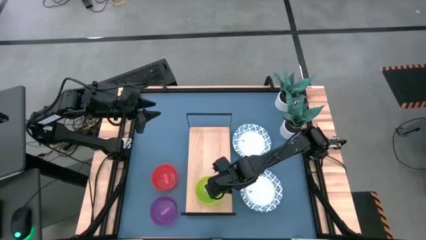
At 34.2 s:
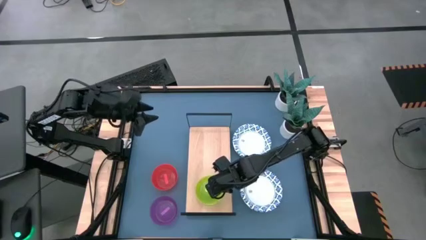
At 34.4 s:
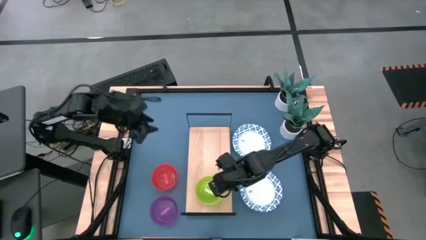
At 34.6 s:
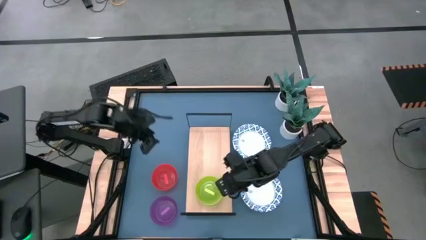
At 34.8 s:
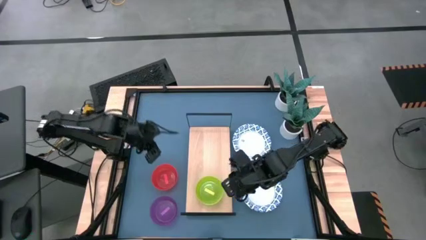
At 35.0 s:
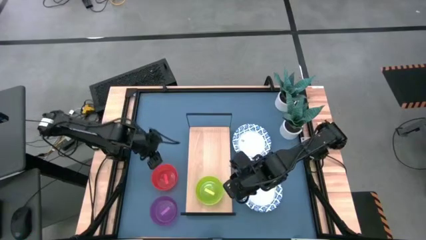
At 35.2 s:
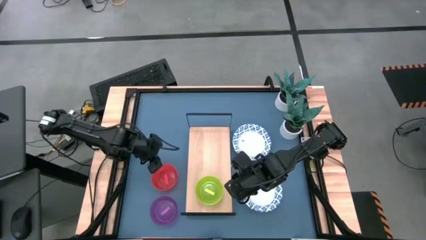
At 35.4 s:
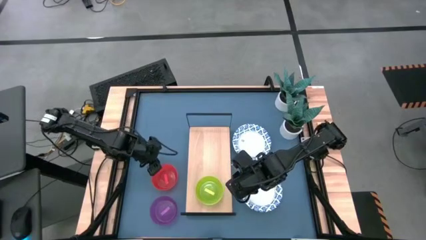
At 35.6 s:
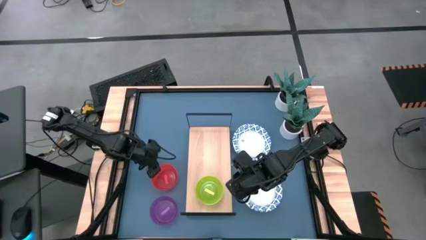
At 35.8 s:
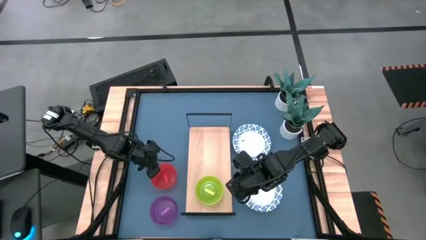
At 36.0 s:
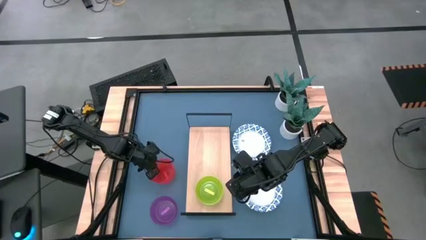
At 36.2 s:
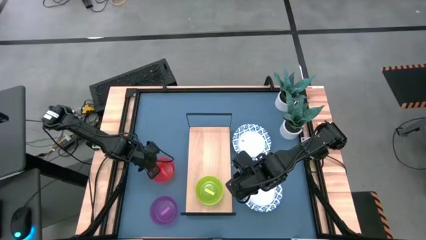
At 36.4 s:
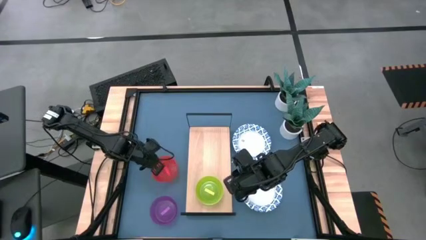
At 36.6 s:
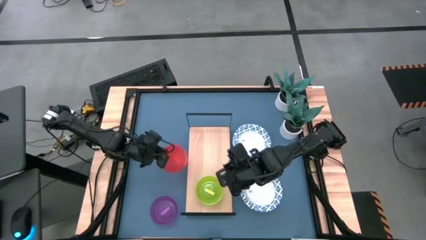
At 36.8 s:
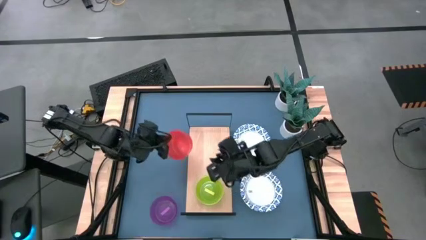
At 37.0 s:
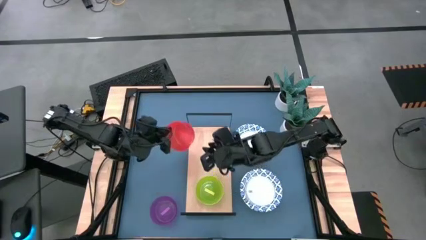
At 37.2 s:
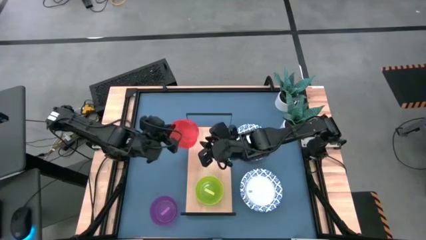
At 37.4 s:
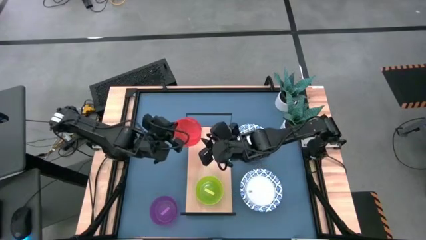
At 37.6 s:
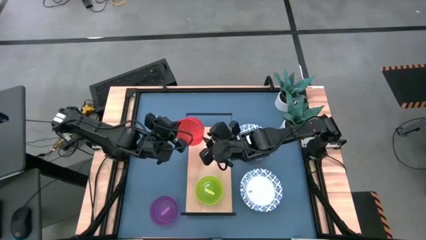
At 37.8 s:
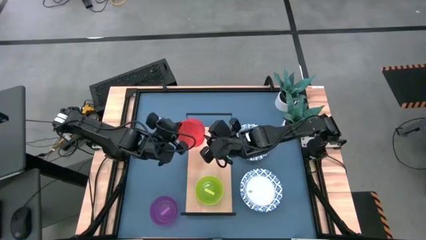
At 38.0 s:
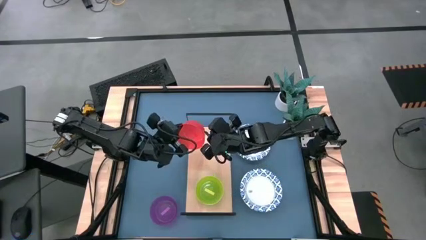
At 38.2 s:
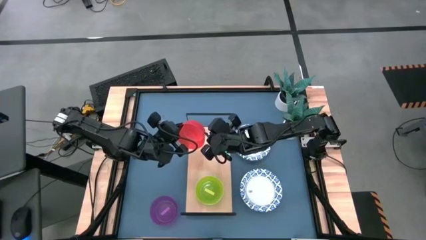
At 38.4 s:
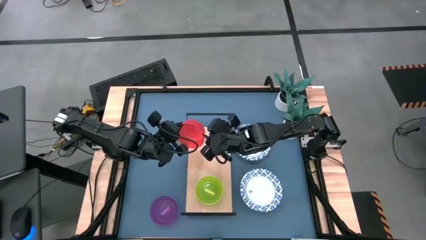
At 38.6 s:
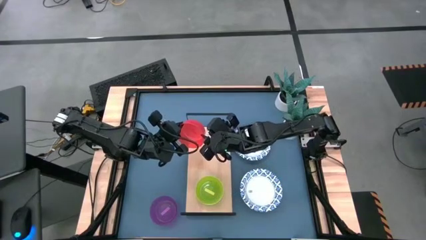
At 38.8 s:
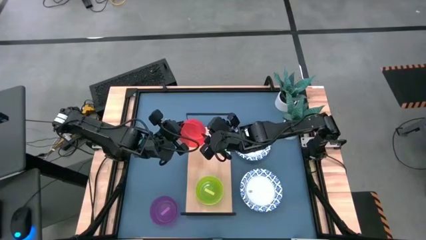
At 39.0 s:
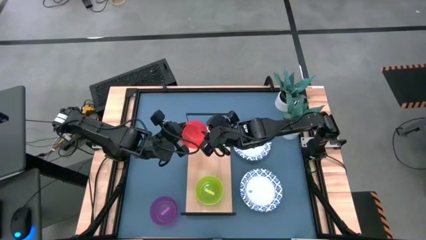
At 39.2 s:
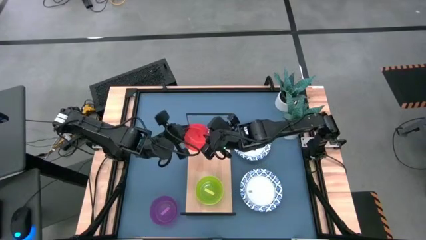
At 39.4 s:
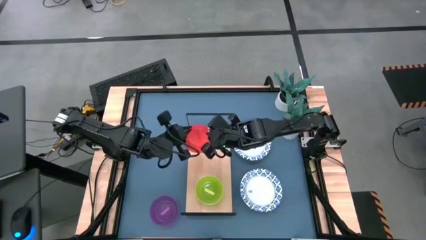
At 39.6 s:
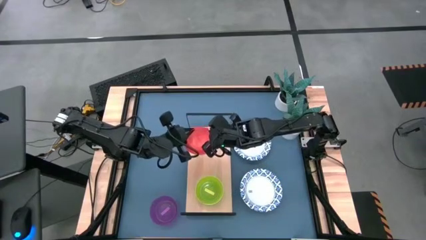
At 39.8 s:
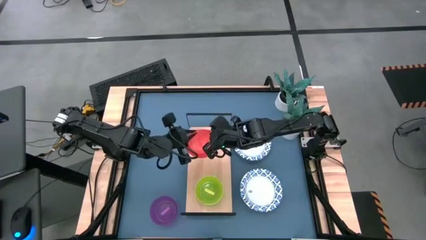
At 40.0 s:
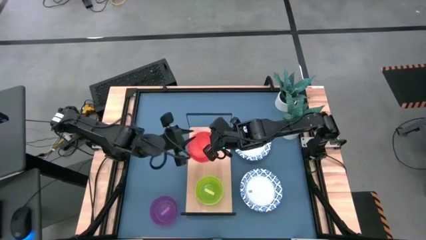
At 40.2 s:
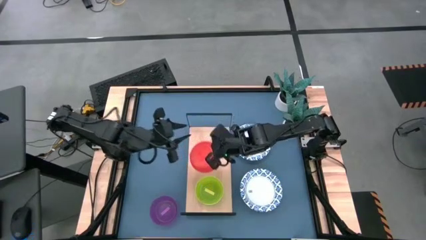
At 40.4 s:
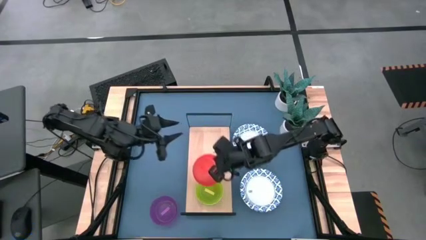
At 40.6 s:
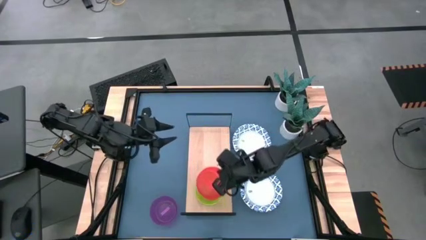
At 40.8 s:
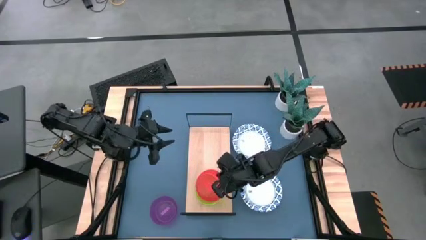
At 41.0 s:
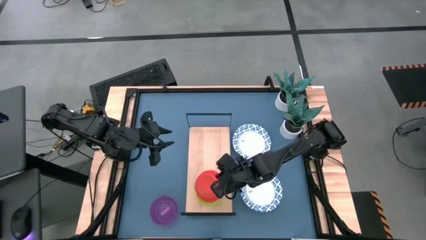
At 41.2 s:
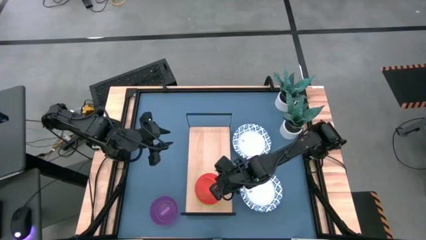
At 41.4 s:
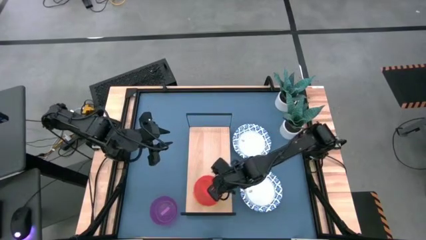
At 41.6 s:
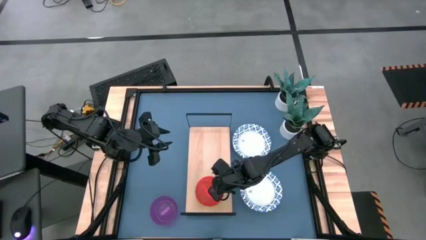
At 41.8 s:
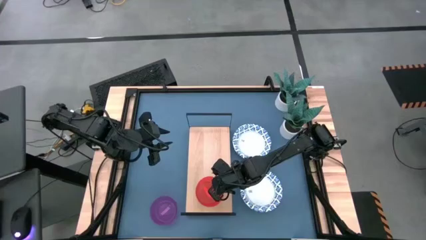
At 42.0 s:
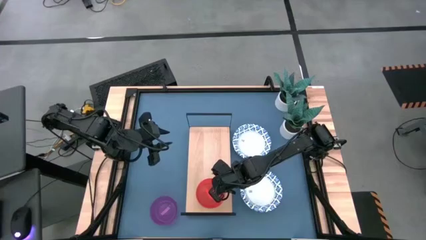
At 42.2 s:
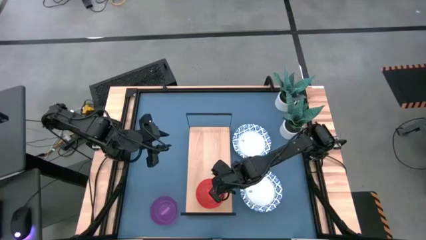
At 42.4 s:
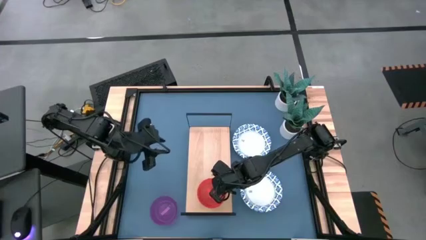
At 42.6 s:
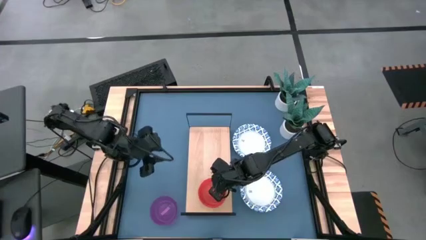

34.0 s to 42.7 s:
Task: Place and stack bowls onto a shelf
Stack the orange bowl on top of the yellow bowl on the shelf

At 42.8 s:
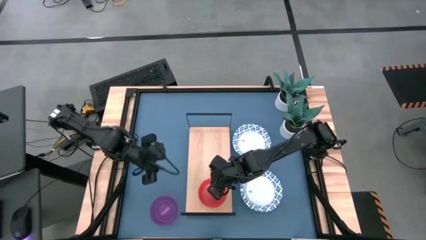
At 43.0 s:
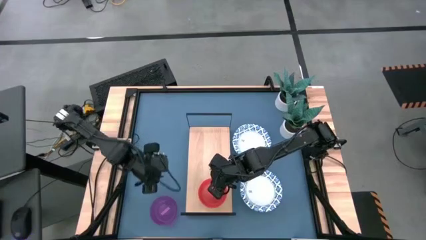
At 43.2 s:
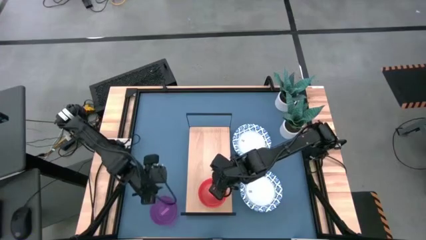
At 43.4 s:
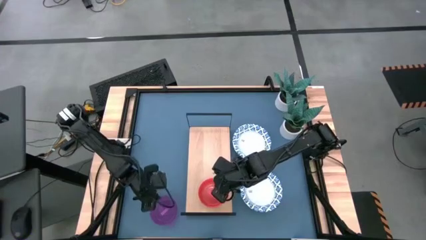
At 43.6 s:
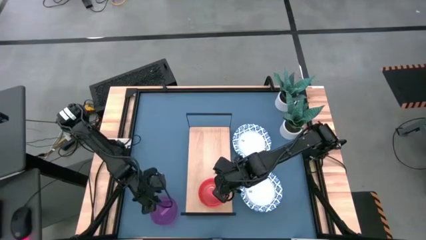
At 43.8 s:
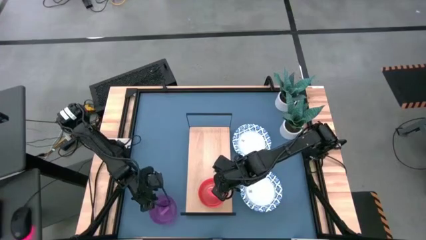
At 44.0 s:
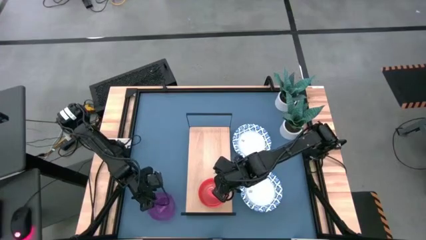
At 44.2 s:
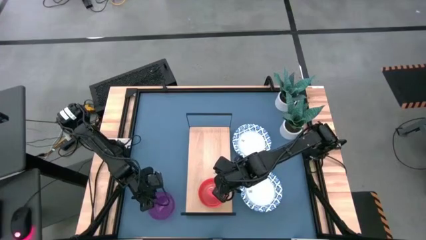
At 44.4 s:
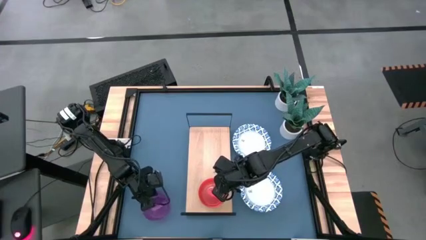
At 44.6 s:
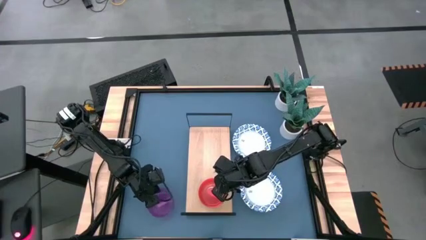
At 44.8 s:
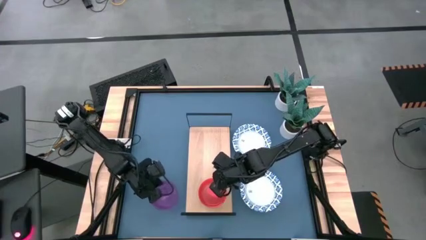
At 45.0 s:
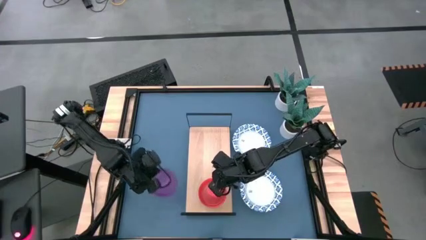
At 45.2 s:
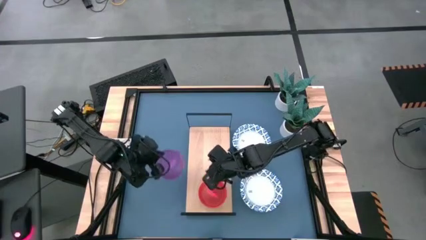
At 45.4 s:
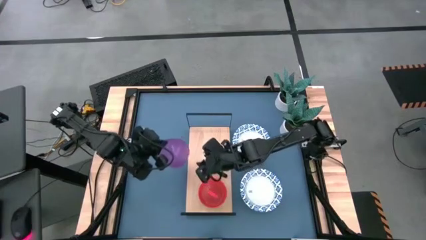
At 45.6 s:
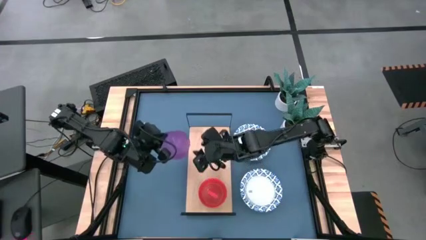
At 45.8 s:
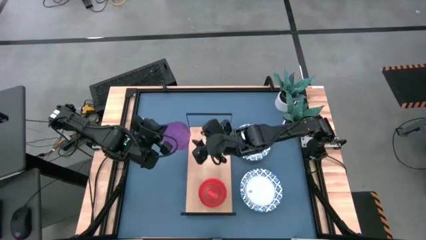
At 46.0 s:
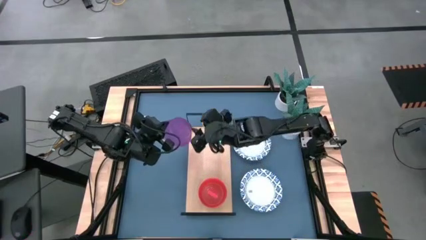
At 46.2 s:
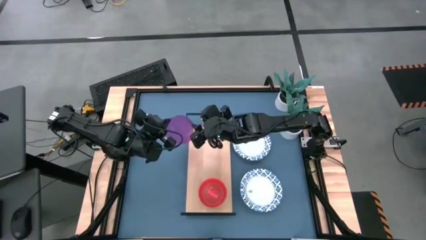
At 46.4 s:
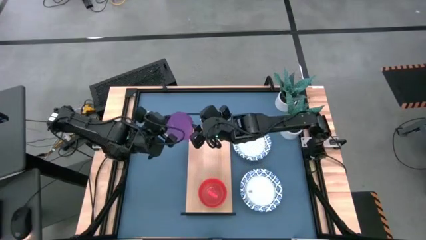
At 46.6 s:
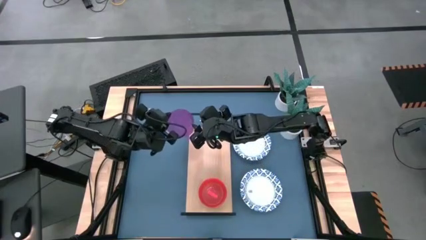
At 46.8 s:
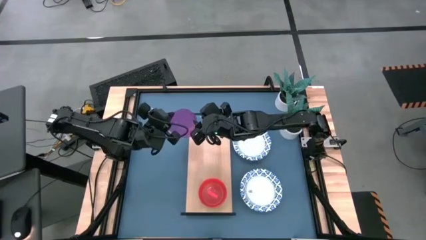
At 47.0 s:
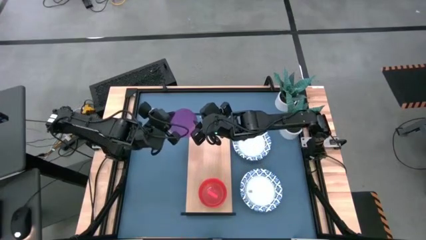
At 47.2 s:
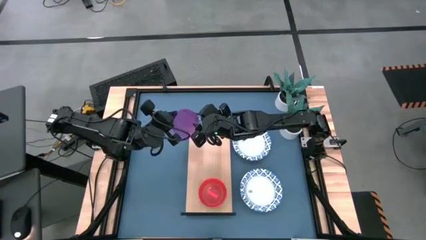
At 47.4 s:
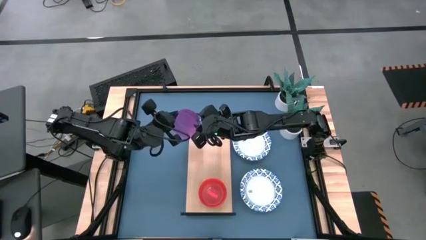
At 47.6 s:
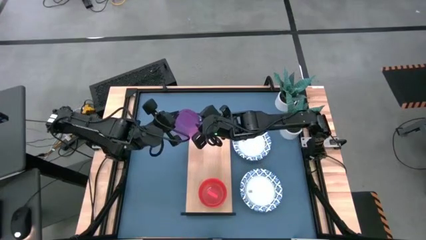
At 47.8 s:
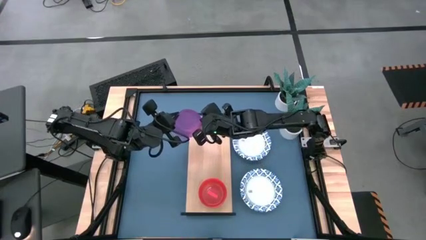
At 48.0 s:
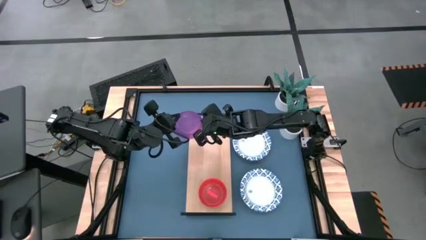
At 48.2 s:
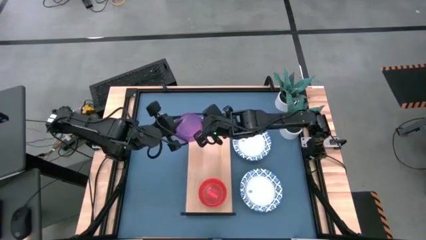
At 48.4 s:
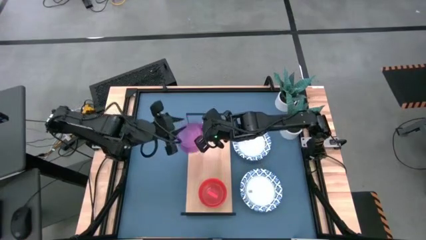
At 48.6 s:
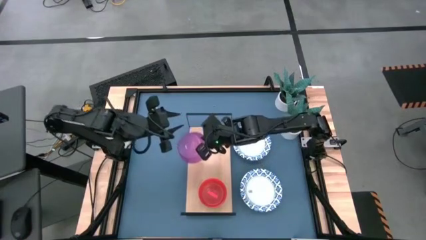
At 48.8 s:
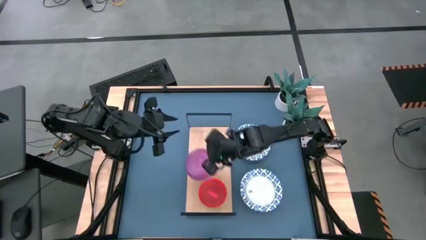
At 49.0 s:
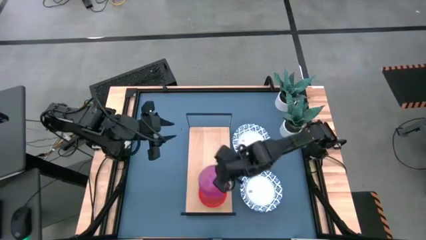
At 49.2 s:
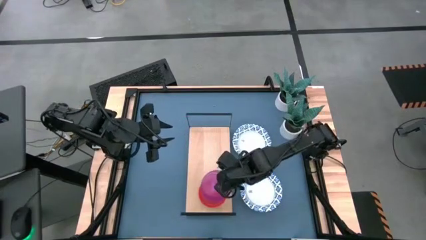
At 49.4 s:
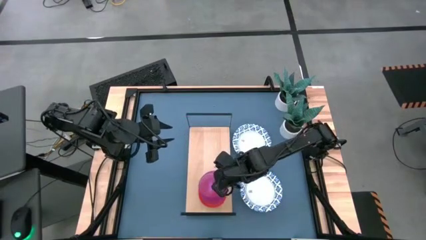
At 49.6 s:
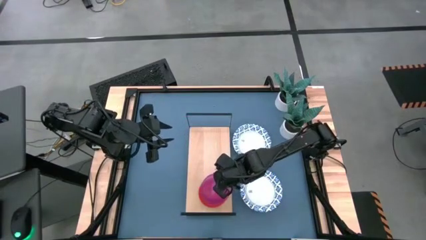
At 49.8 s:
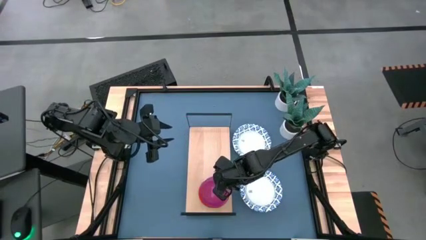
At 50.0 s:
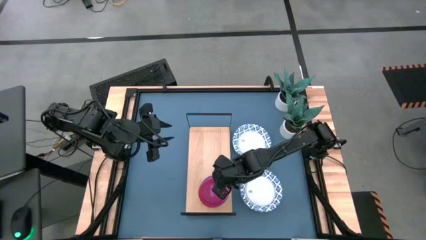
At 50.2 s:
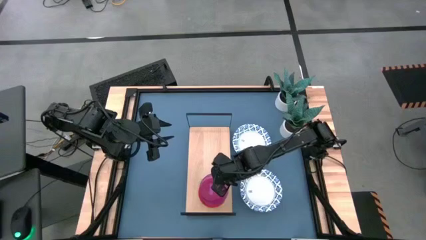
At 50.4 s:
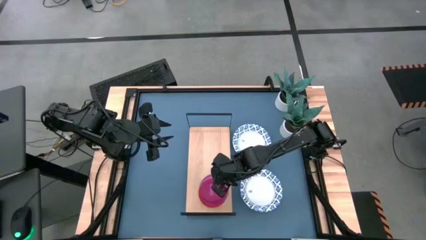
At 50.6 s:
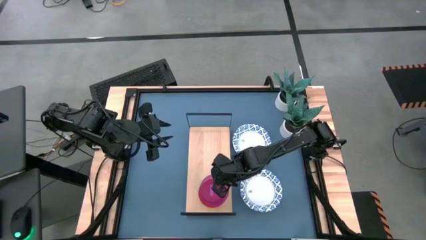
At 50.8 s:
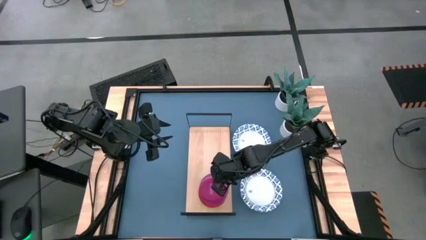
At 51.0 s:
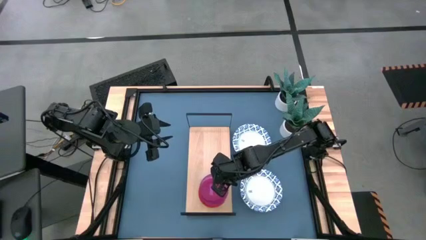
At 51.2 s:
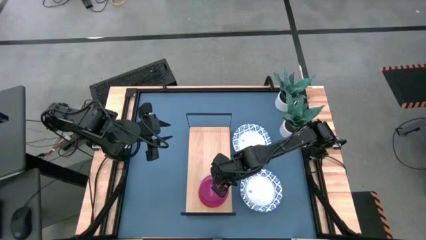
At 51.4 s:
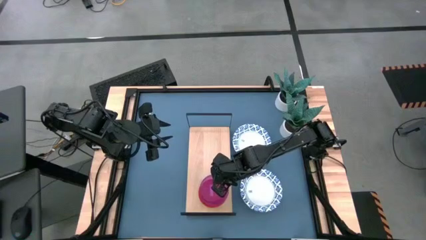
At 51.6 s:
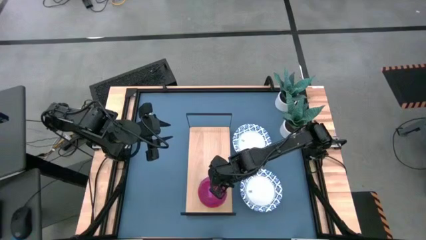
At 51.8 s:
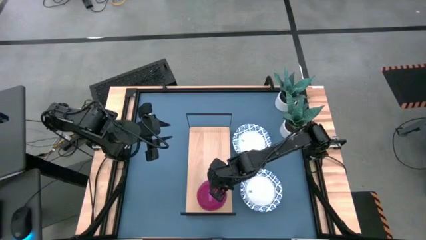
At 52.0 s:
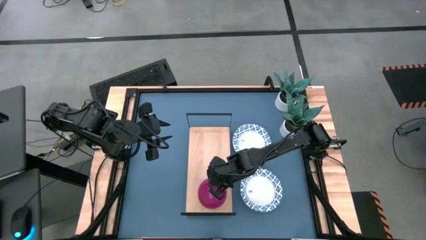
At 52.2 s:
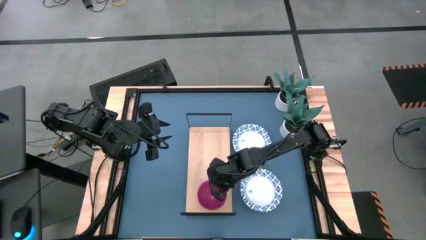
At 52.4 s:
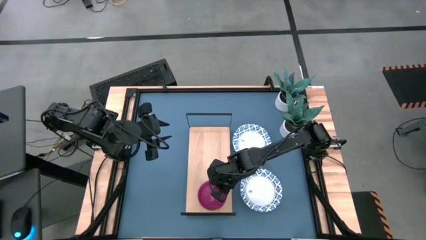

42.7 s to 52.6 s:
Stack the violet bowl on top of the orange bowl on the shelf
